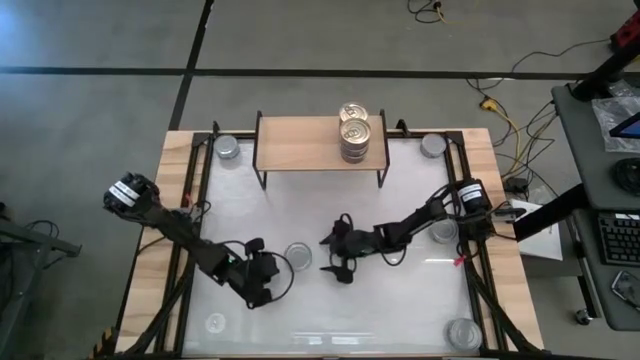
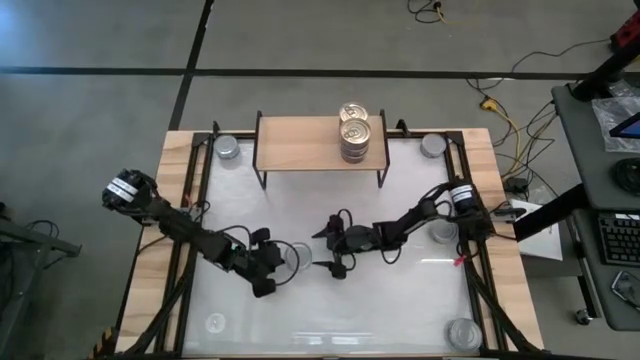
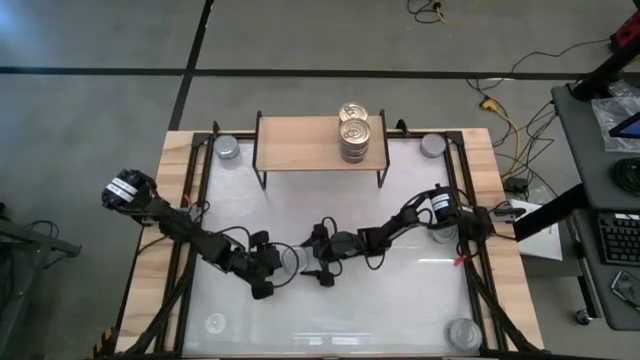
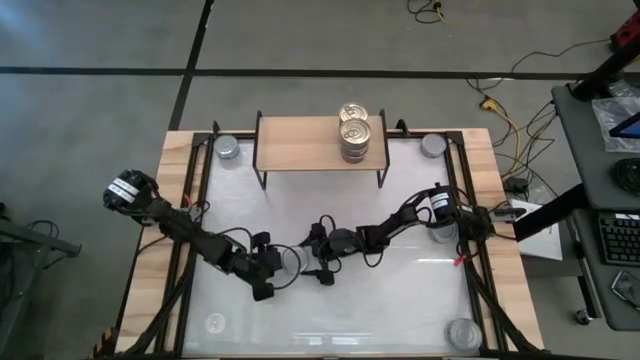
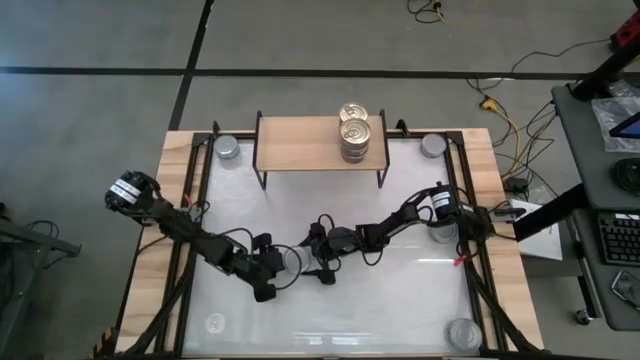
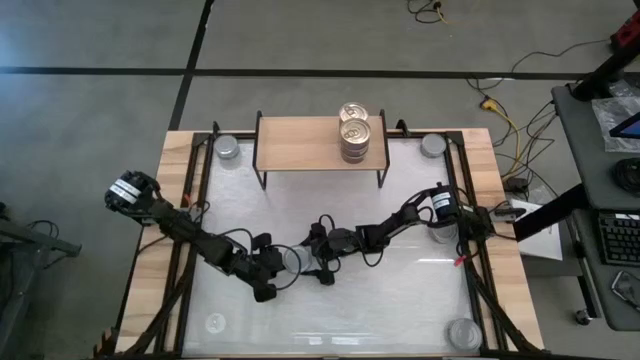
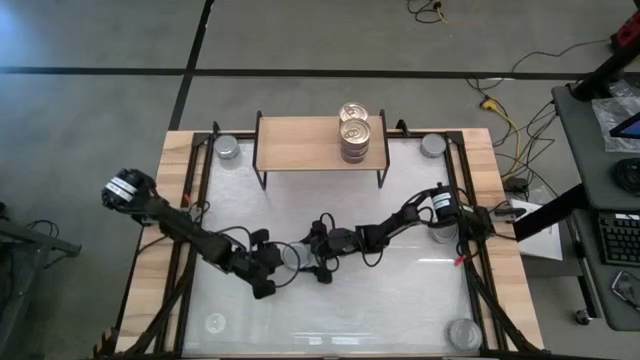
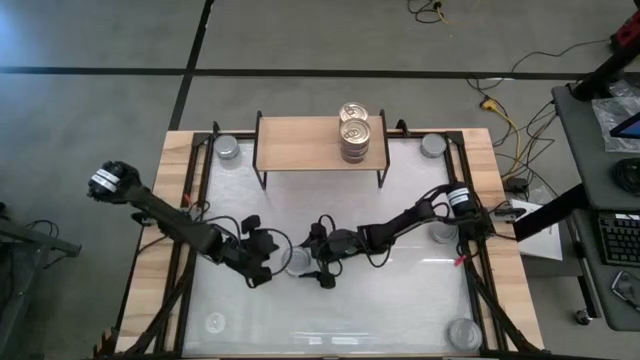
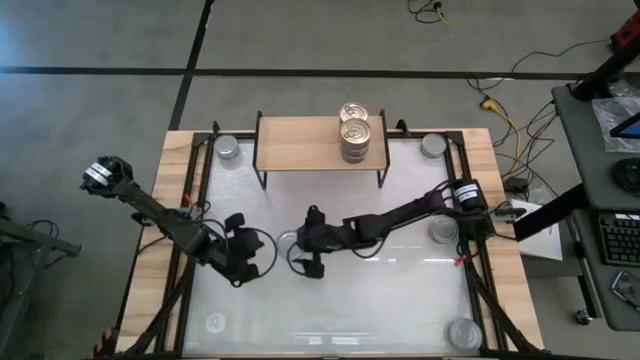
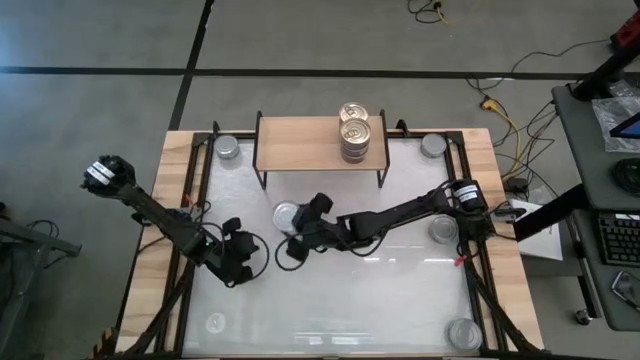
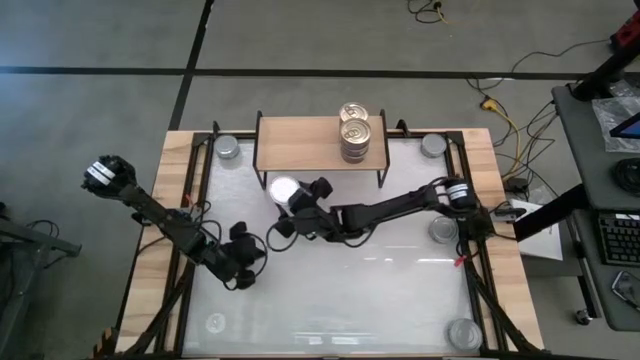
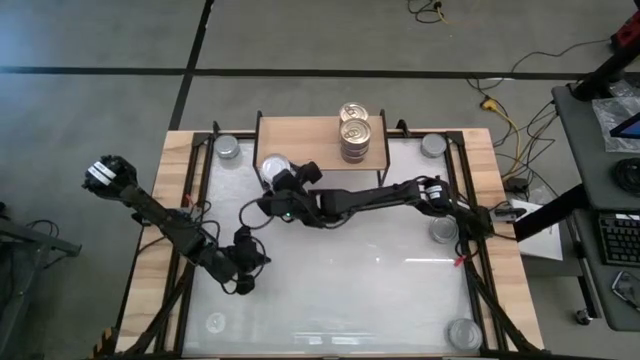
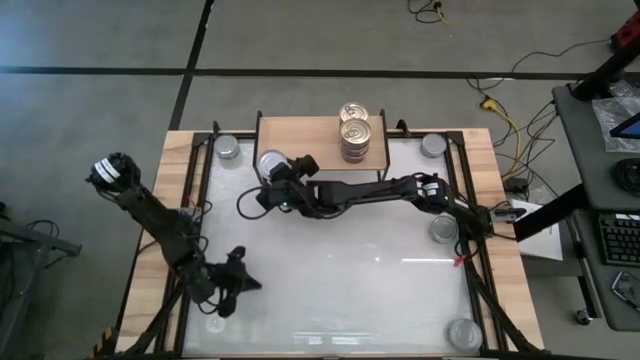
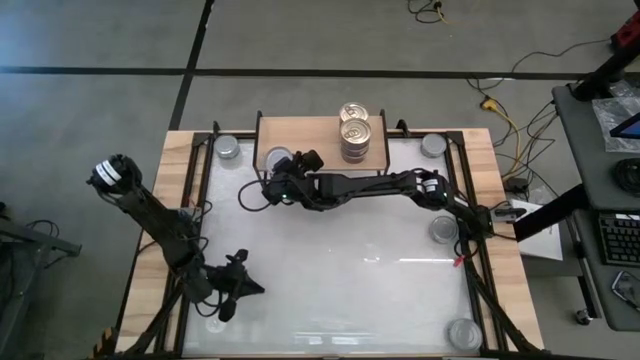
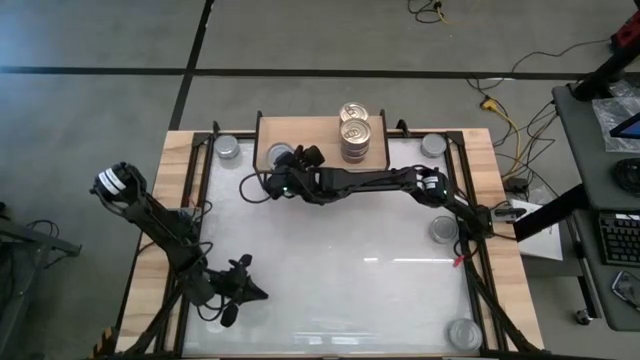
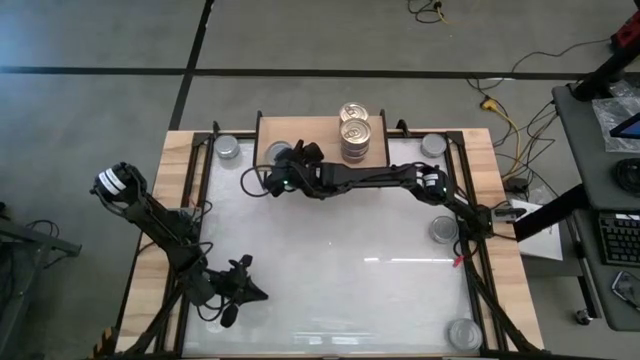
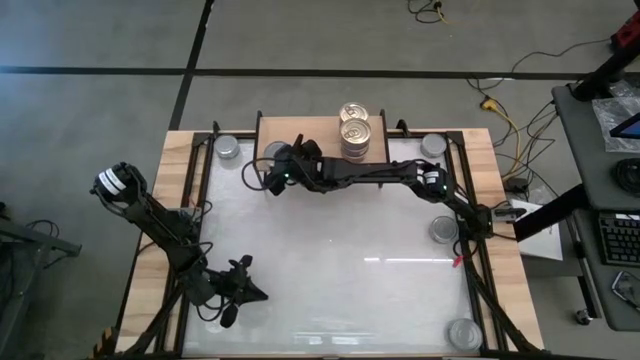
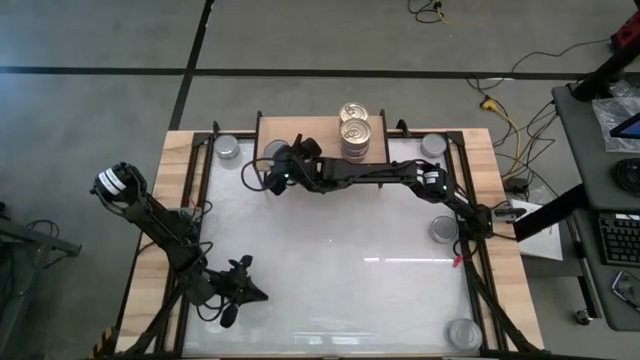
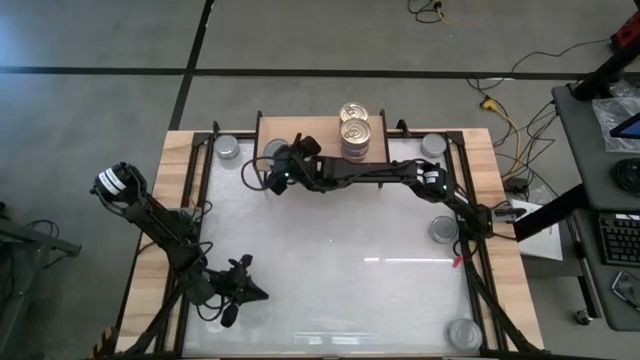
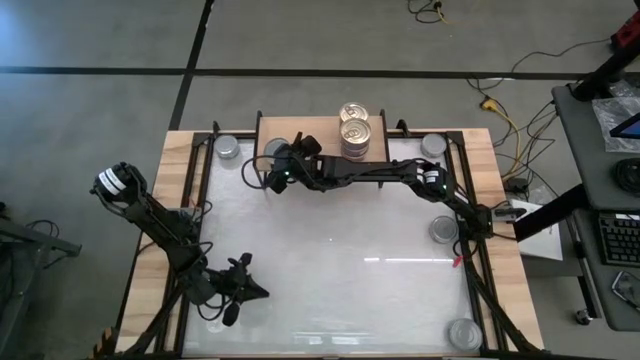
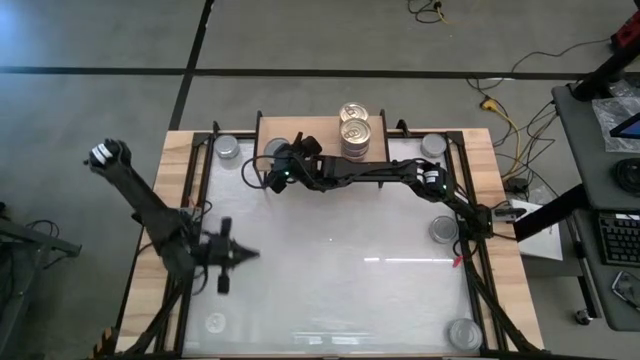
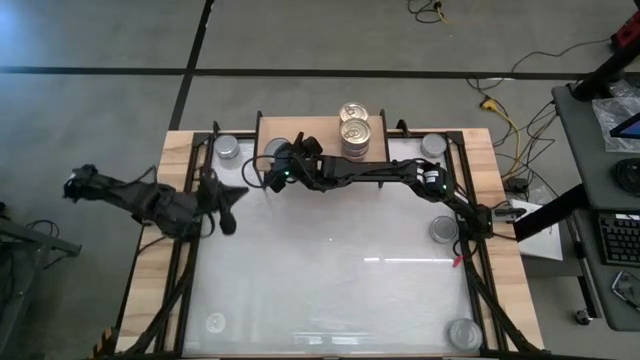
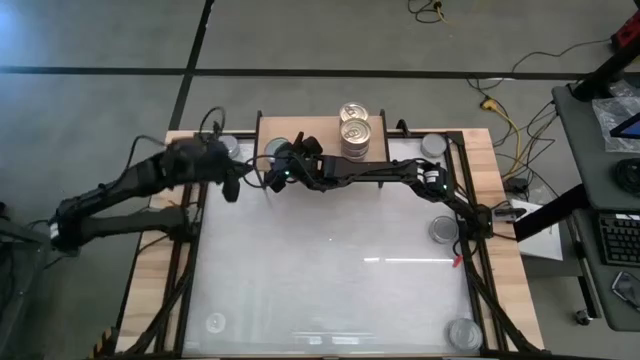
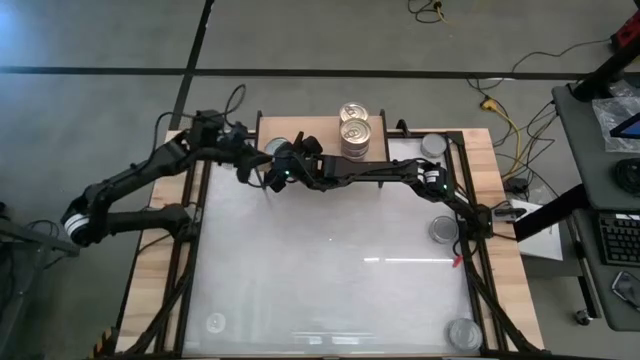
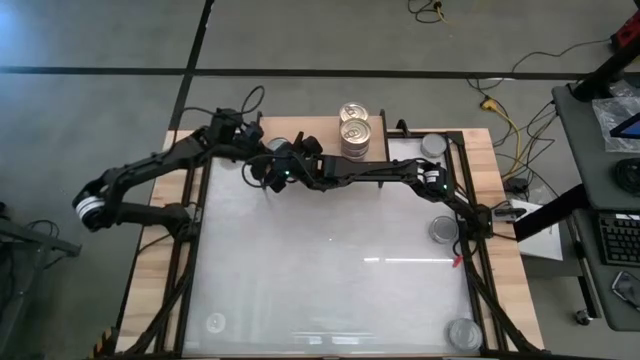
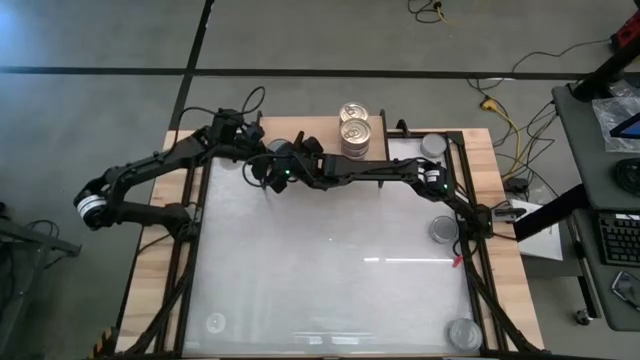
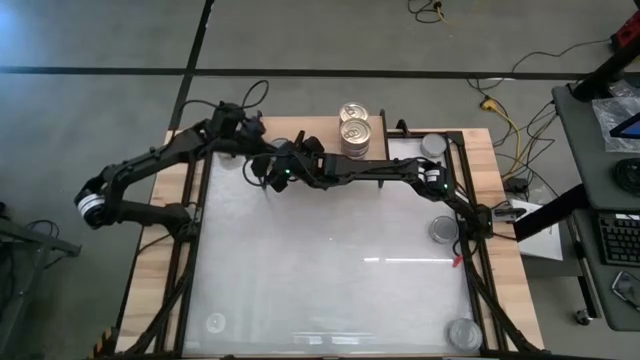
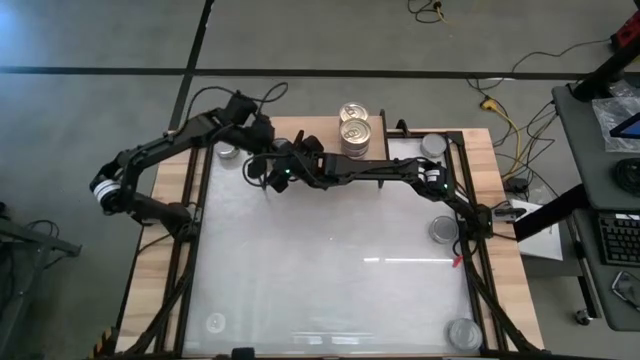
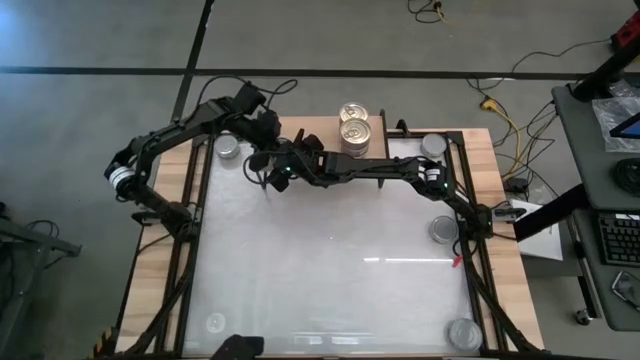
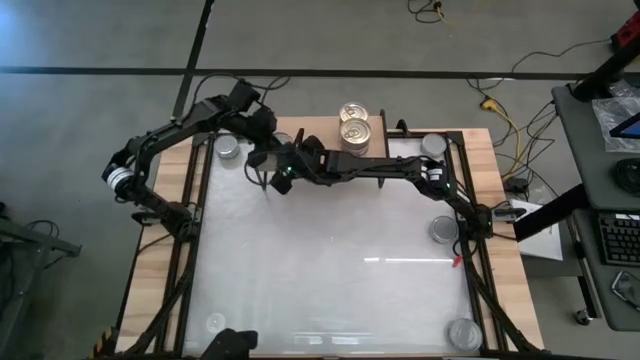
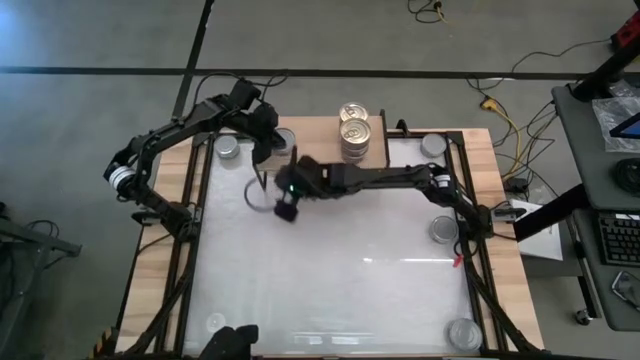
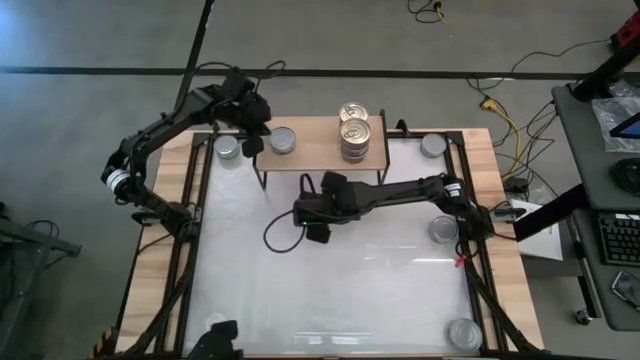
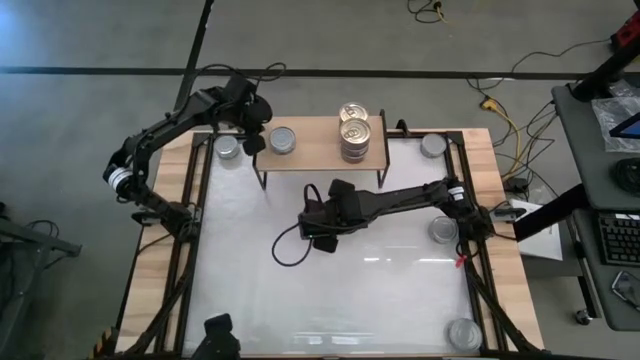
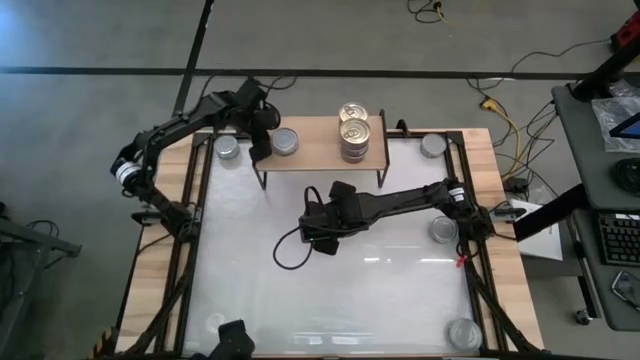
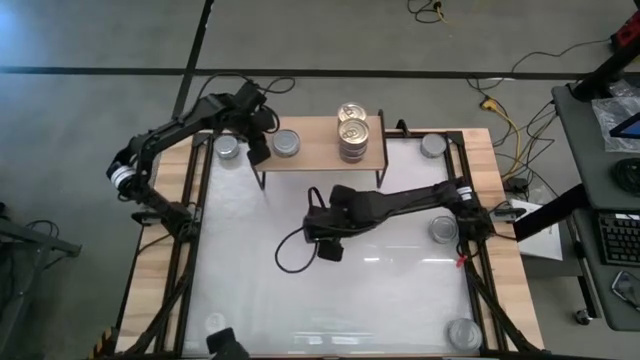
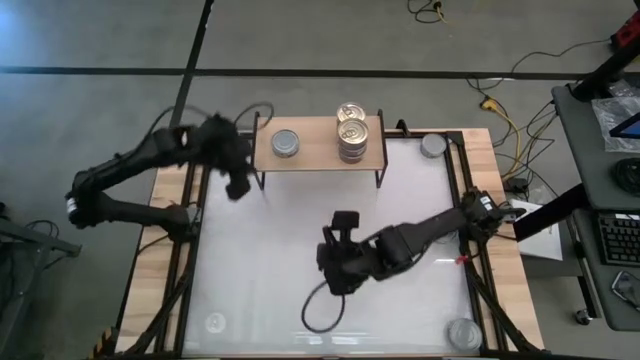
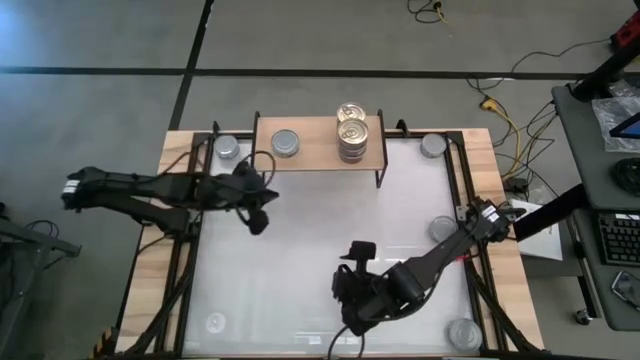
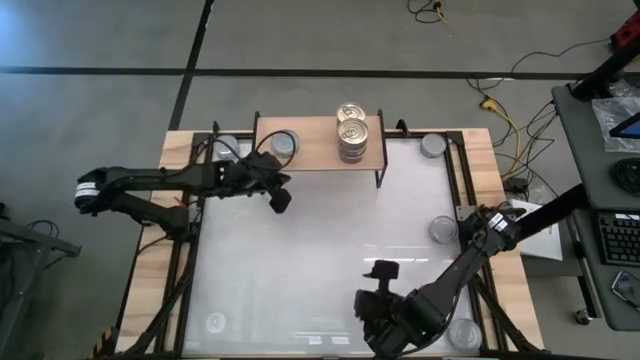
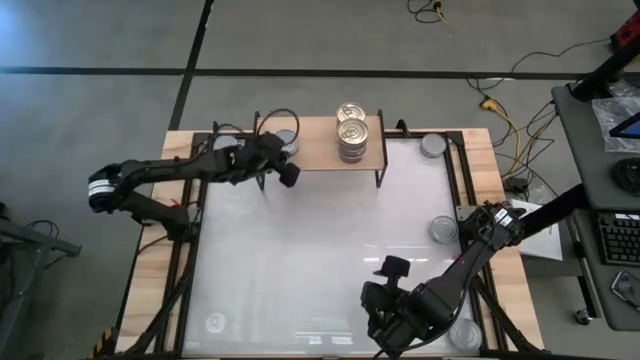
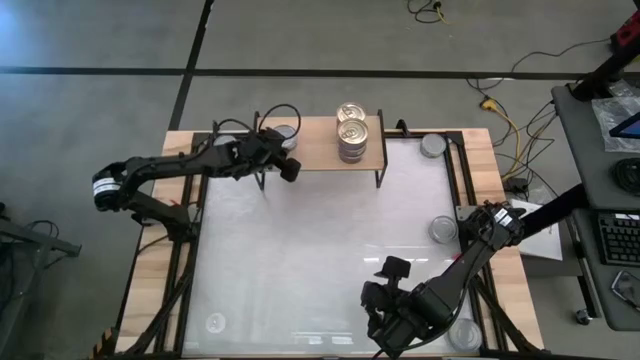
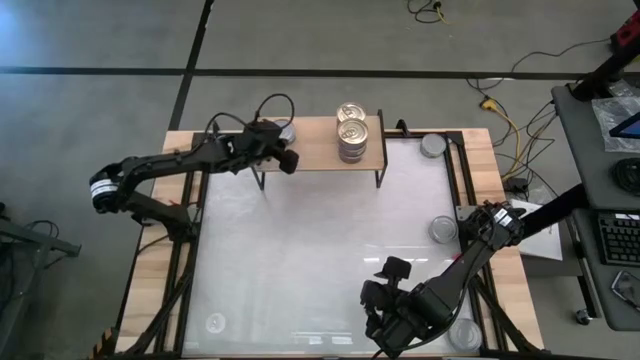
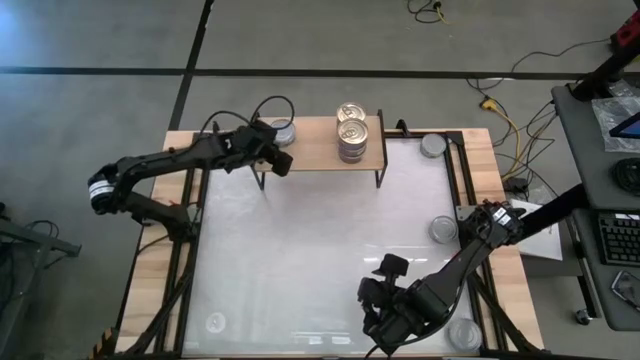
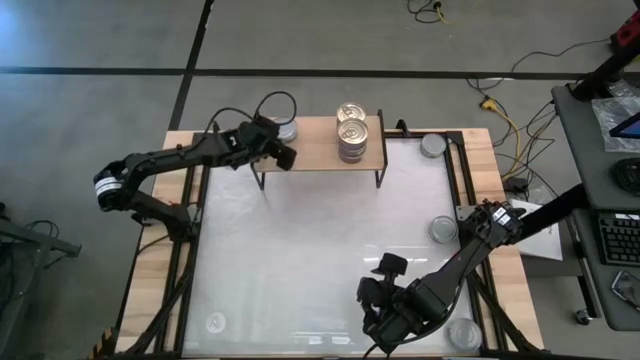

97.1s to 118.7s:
Task: Stack canned seafood by type on shelf
Put the green tuna can on the shelf
